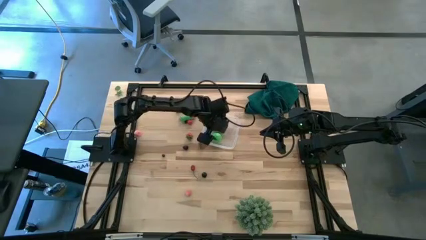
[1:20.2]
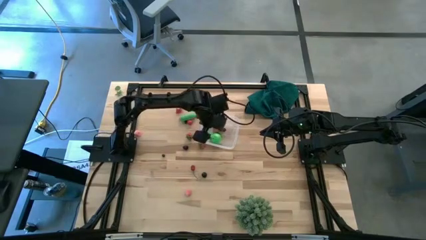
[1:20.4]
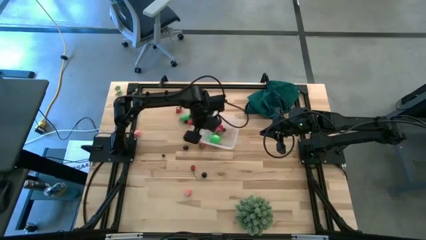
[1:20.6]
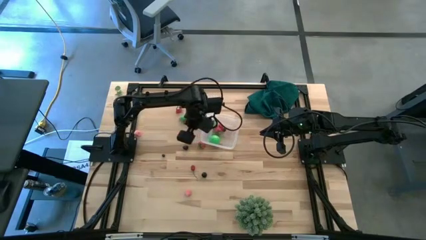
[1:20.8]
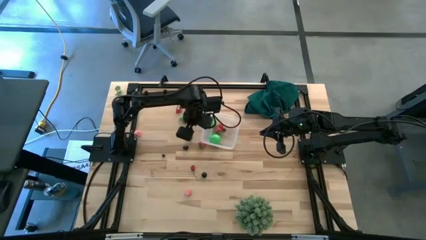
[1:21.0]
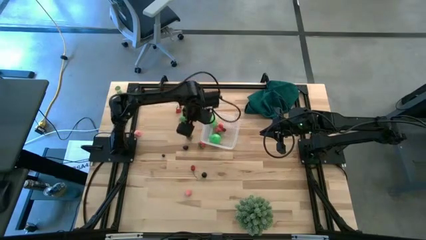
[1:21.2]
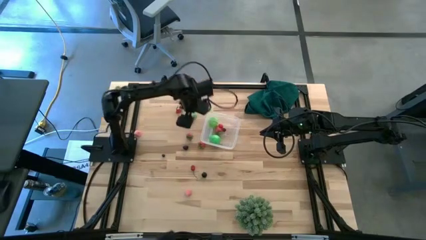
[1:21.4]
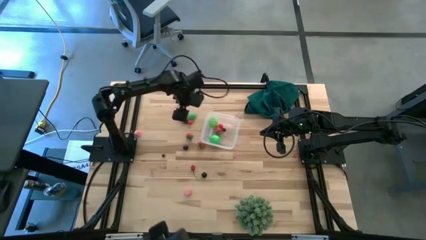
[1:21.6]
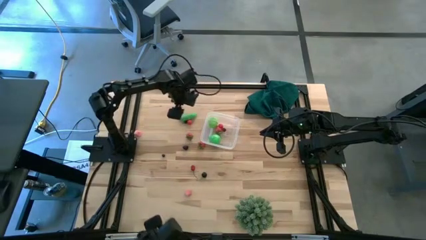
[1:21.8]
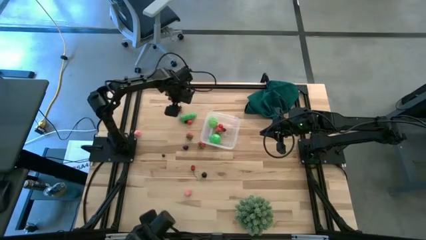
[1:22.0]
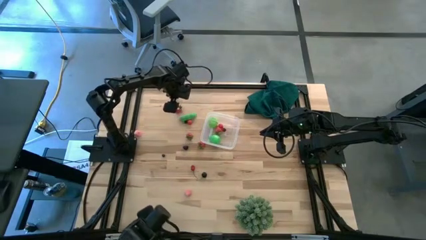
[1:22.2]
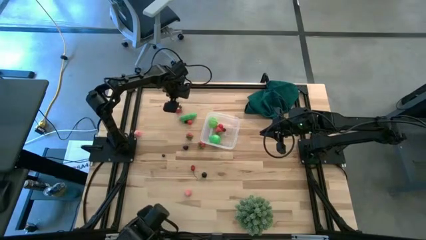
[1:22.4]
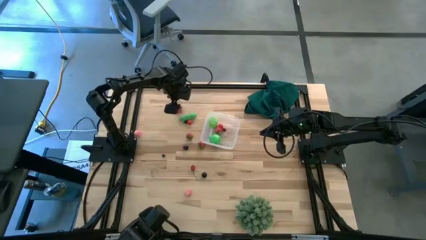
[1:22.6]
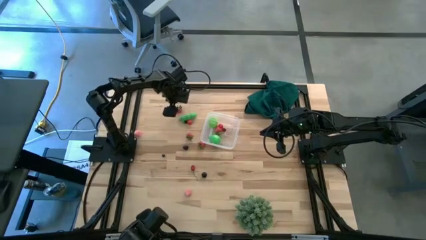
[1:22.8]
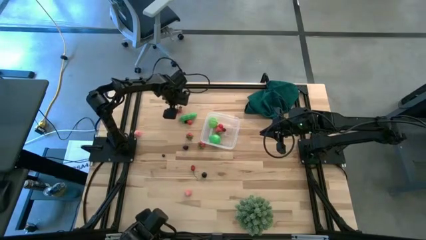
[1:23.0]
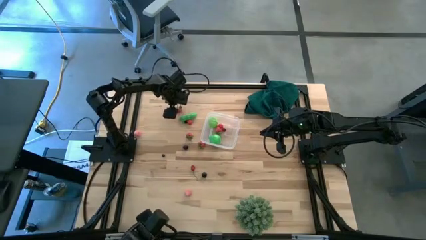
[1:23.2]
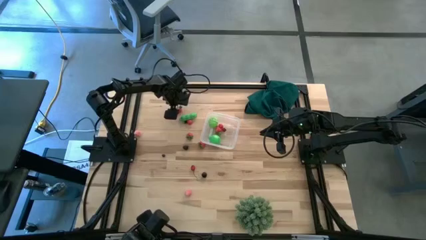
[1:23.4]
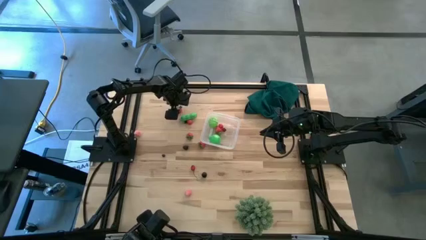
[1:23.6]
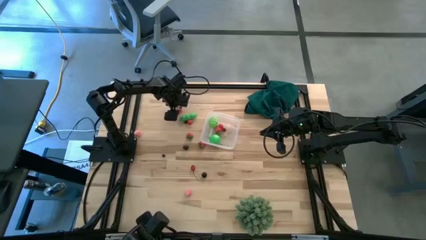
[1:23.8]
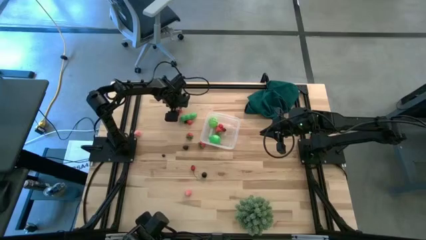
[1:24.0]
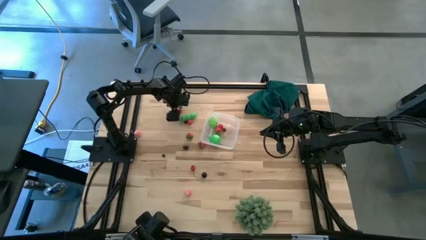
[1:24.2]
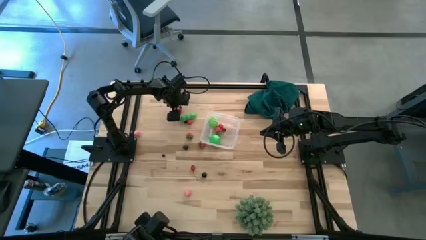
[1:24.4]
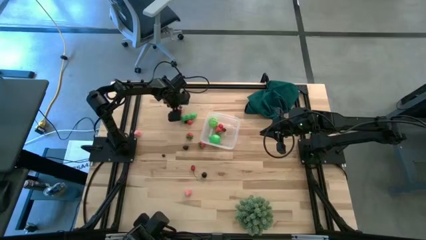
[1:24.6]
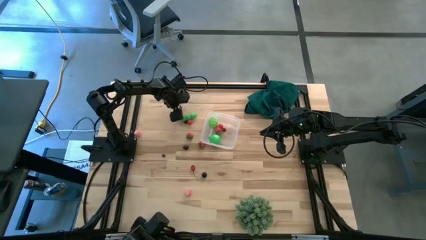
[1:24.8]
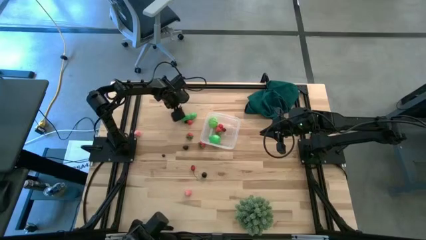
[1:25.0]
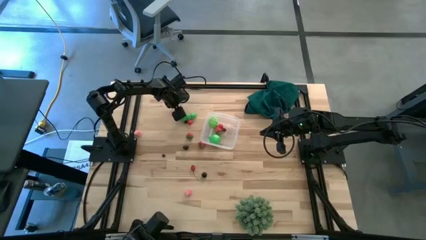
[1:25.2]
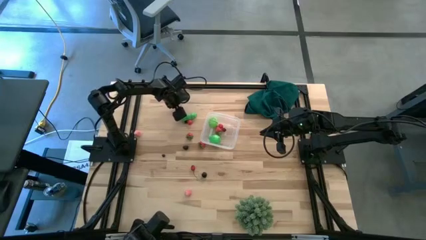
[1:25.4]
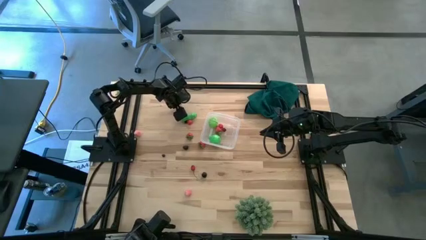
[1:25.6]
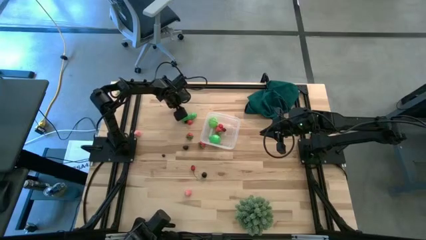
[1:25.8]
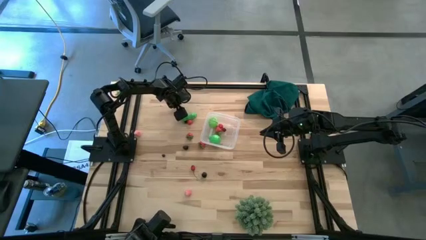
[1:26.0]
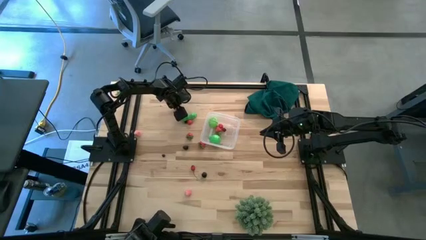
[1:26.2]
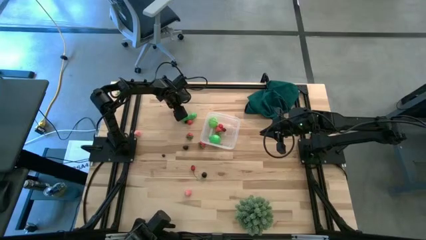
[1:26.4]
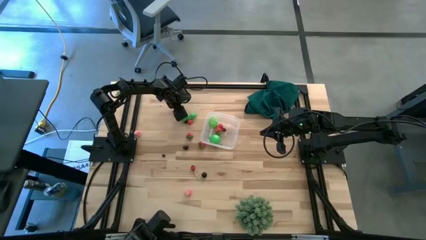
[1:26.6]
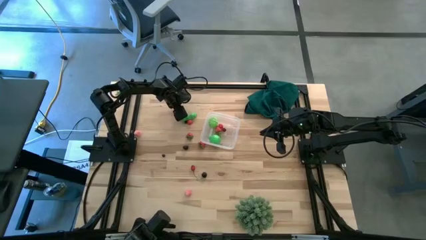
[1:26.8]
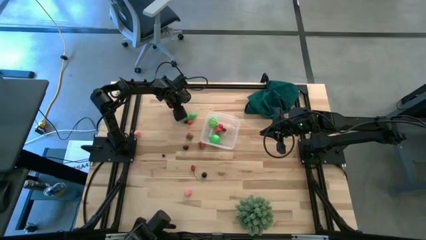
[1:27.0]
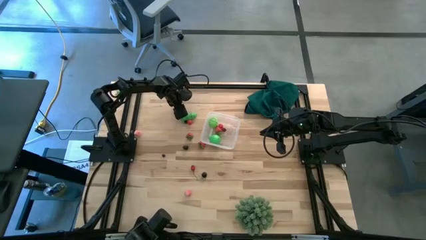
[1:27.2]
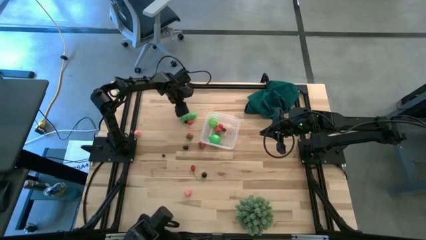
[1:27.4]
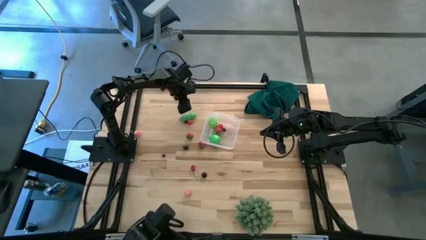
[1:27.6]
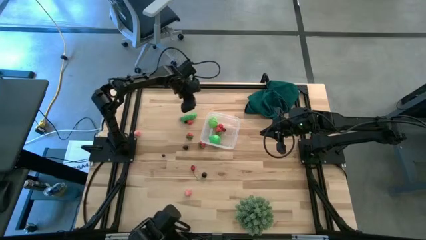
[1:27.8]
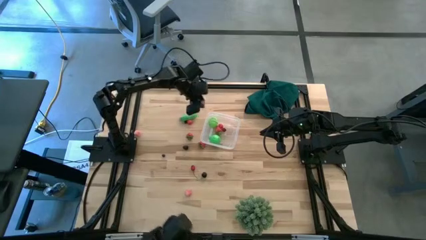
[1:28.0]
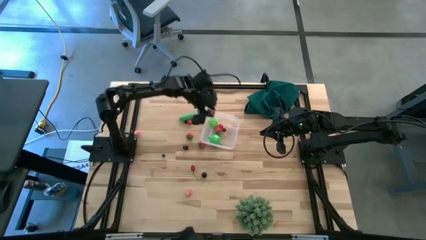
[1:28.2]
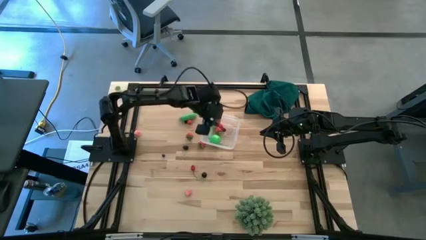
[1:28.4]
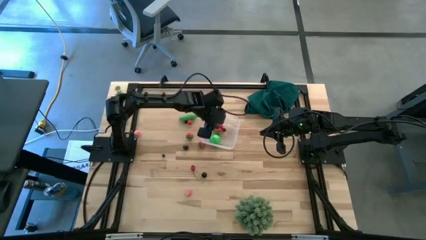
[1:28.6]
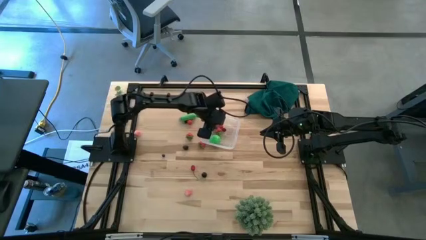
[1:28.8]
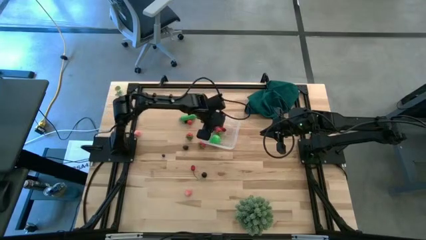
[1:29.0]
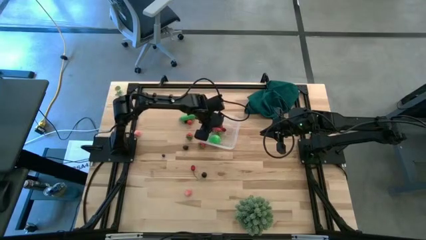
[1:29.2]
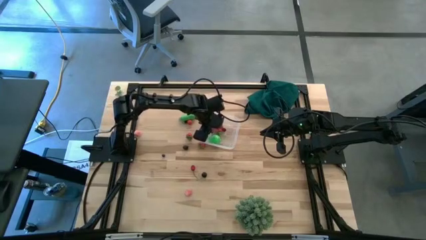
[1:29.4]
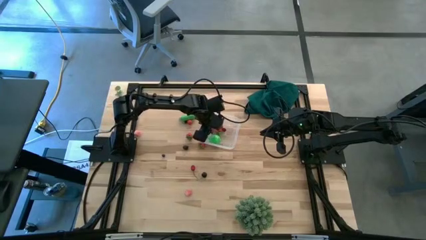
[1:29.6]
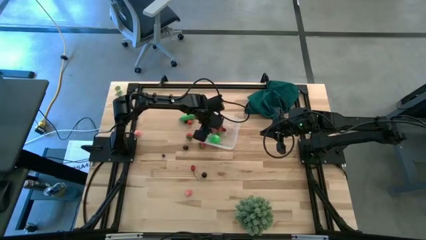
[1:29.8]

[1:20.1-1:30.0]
Task: Pick and placing Produce into tupperware
Put the red strawberry into the transparent bin

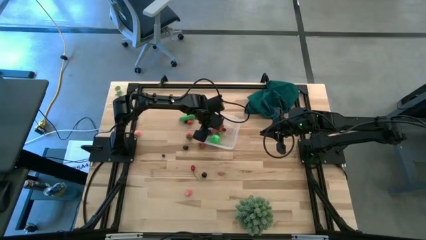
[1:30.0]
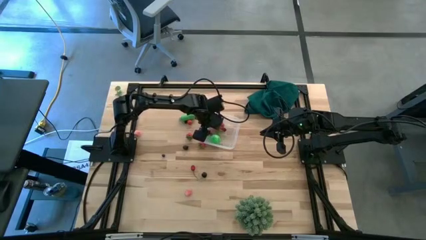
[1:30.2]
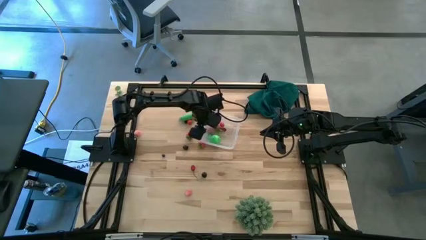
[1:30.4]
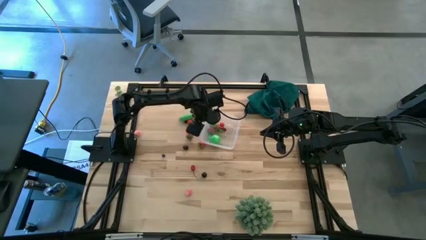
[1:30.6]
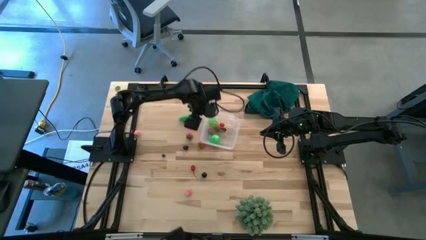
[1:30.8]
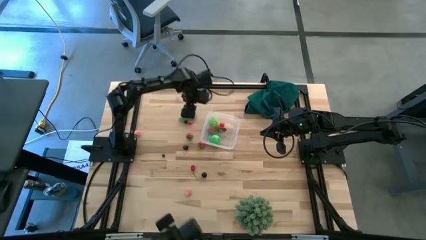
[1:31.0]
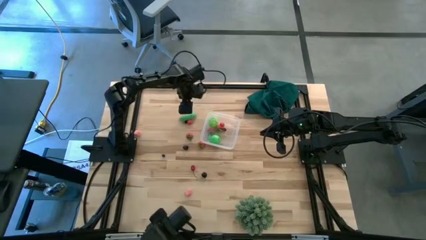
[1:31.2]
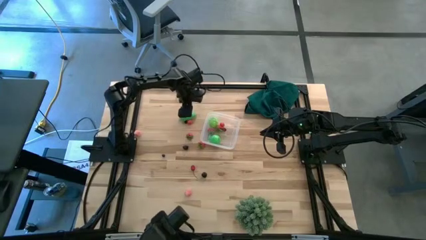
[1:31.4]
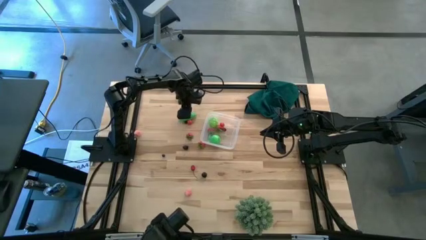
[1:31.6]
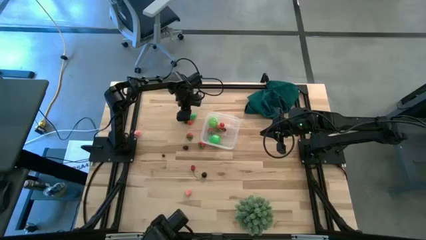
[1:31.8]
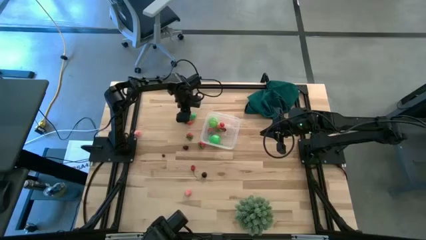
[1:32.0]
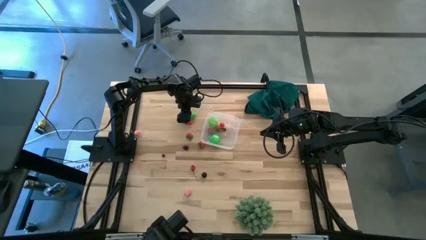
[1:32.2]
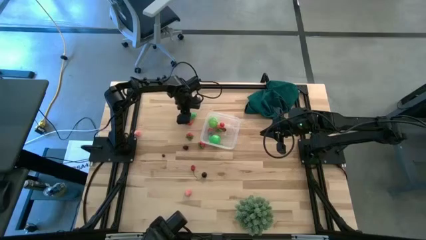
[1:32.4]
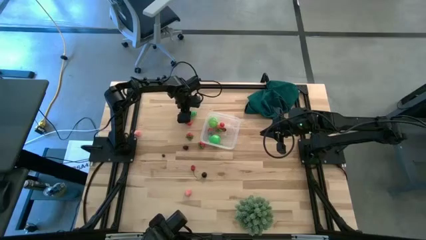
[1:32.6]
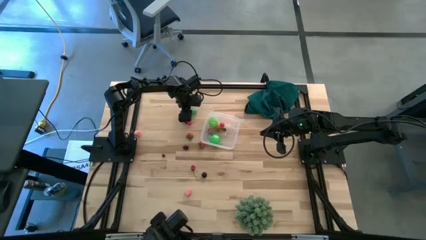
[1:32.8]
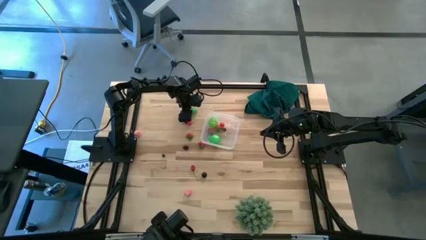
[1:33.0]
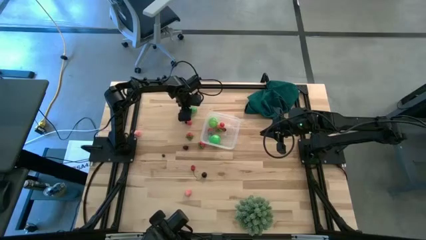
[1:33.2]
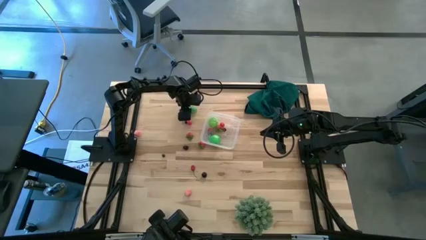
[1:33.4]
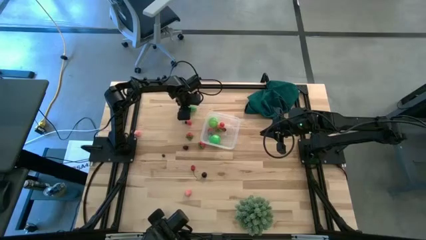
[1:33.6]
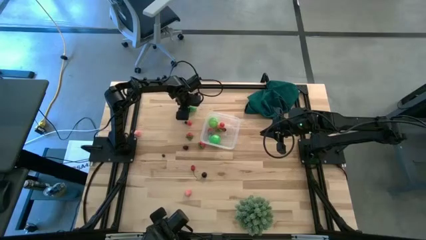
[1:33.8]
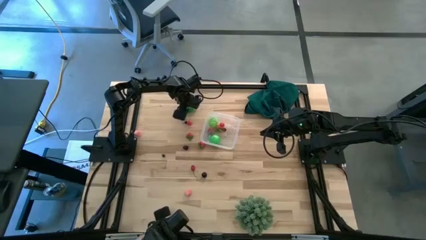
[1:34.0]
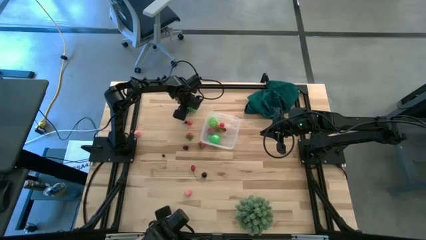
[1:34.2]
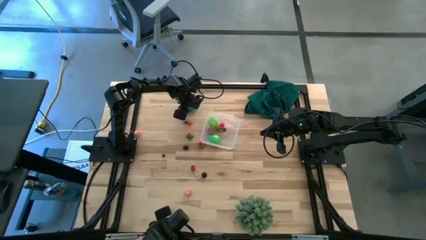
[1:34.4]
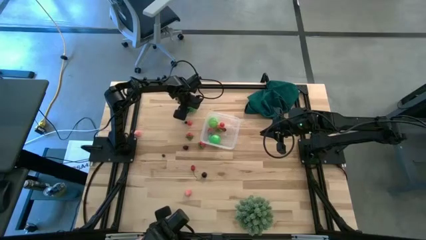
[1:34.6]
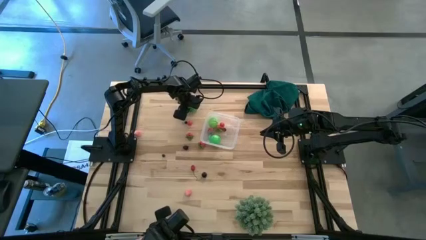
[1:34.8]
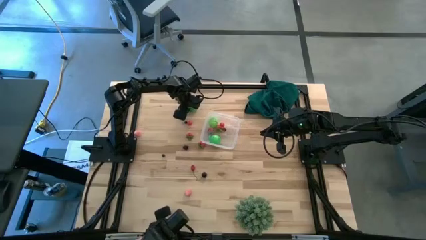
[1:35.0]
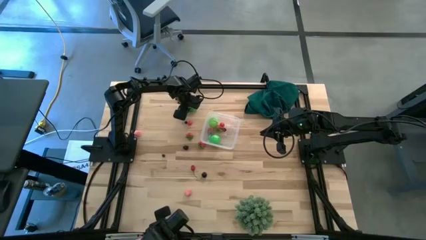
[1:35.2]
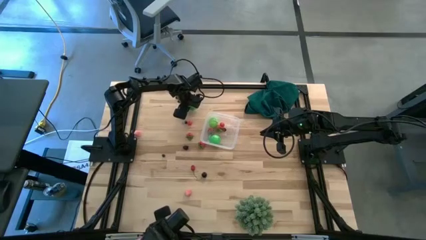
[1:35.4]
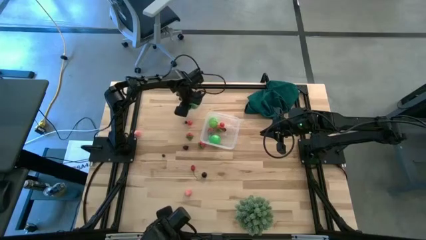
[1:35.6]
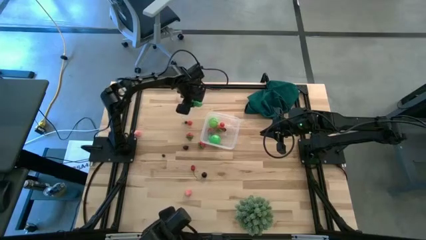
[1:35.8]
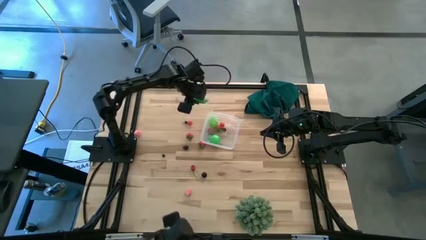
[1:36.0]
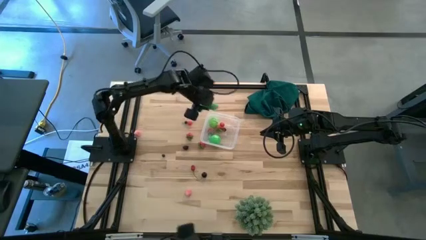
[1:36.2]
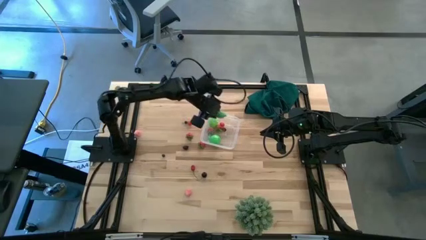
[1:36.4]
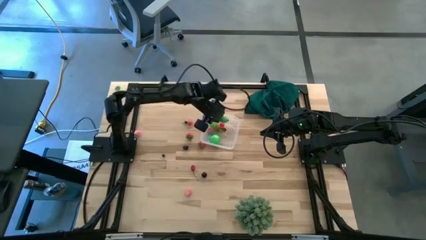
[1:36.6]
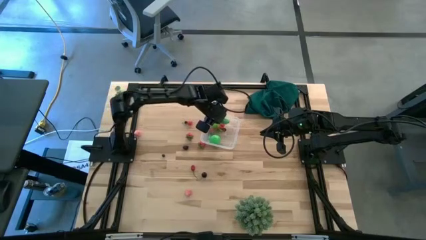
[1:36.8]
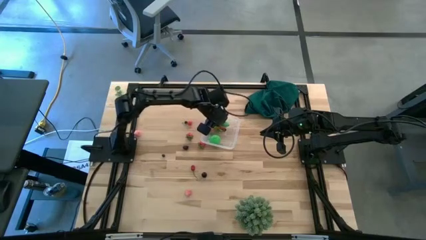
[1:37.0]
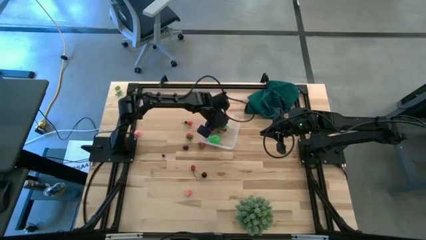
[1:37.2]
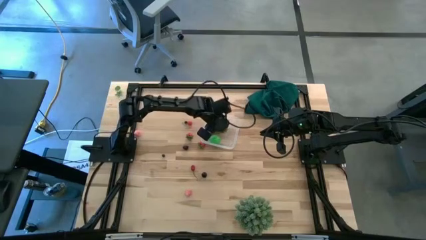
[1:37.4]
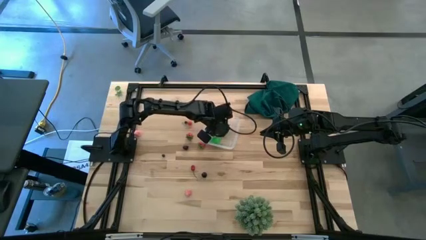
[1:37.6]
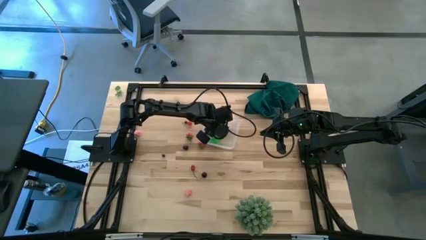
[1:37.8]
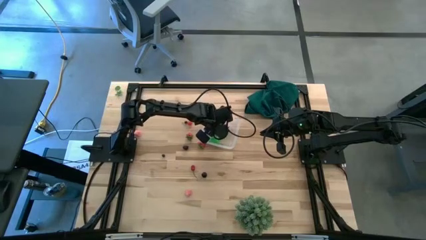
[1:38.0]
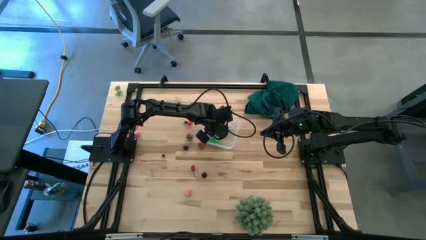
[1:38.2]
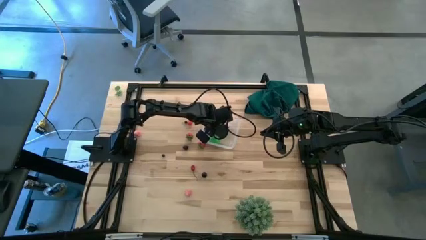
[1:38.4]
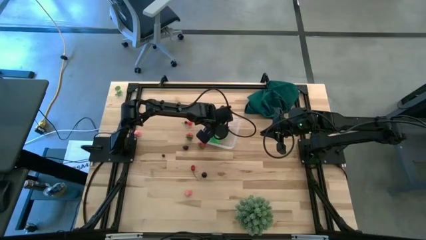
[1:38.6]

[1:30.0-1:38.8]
Put the green peas into the transparent bin
